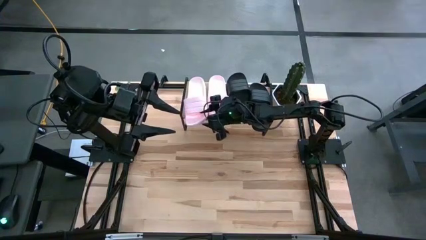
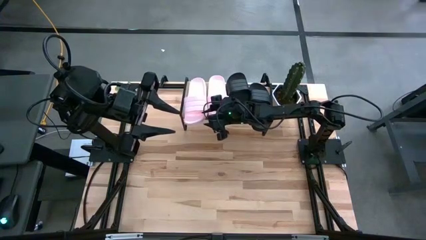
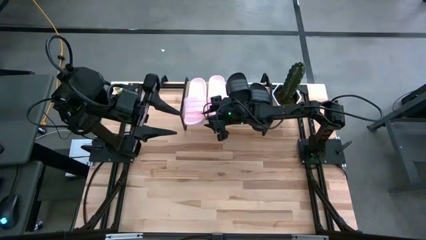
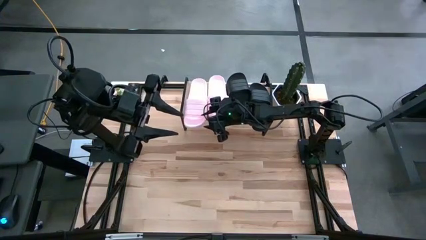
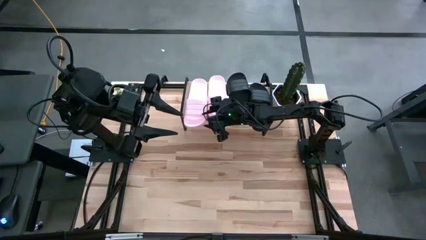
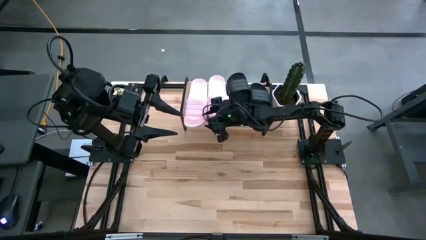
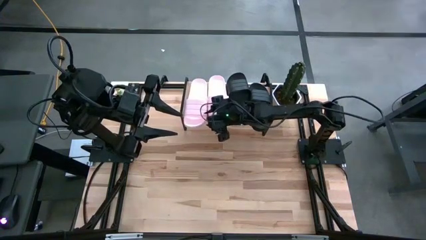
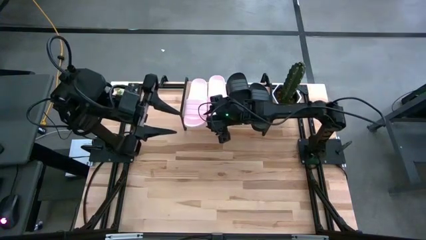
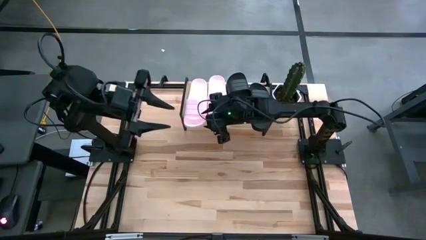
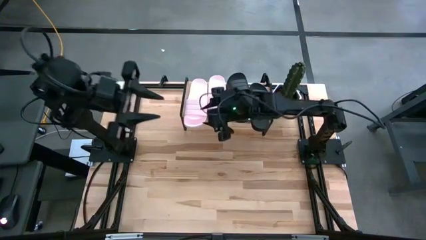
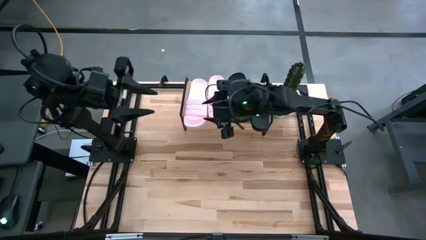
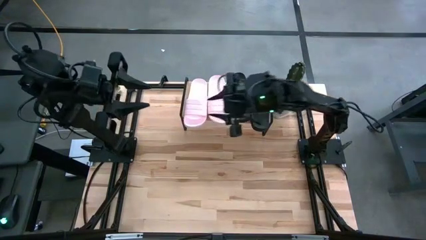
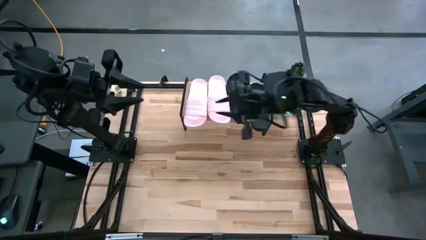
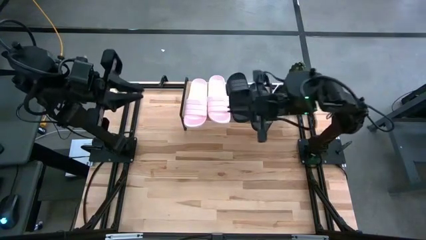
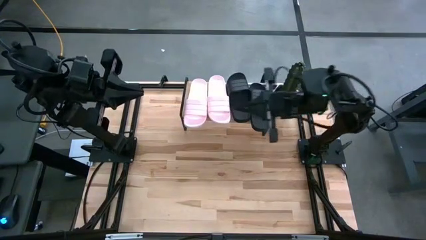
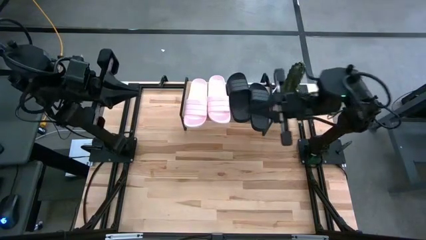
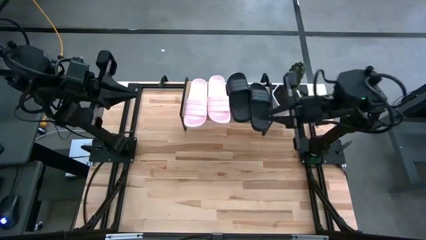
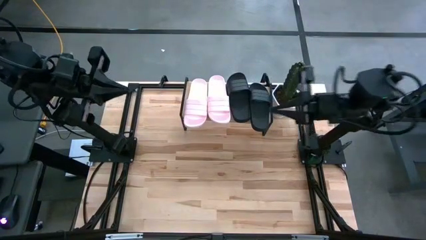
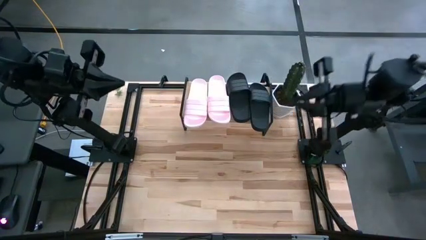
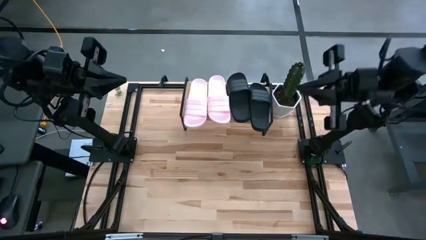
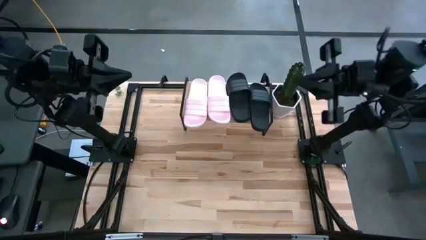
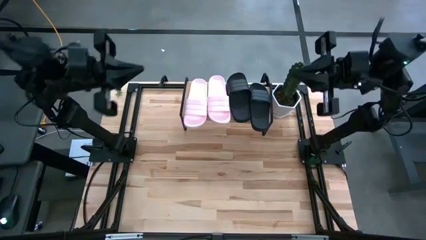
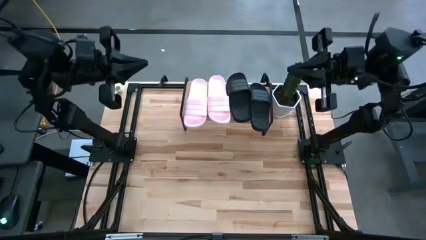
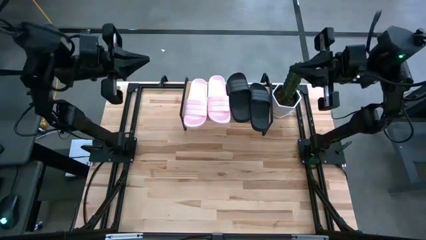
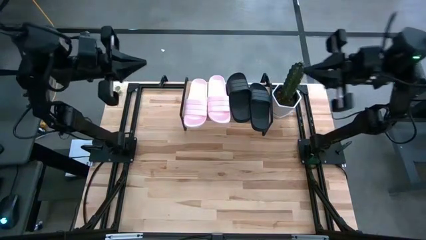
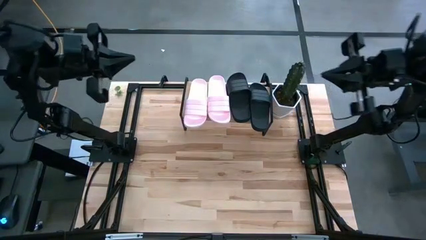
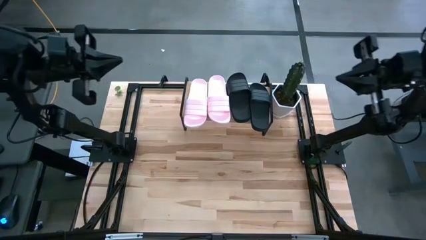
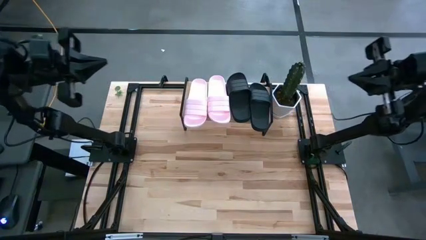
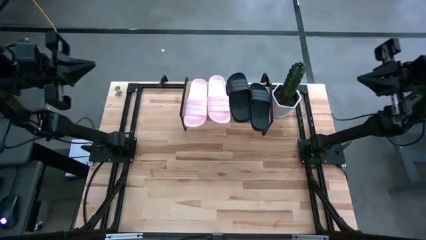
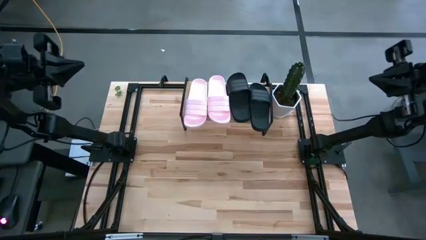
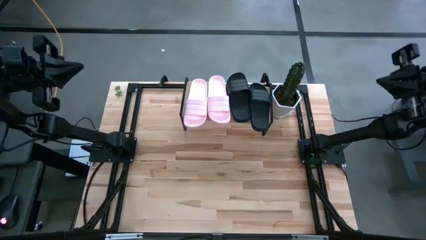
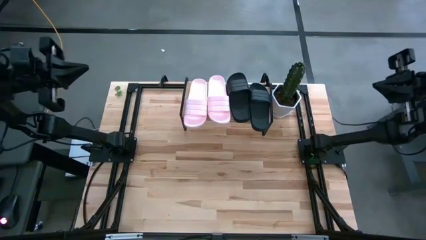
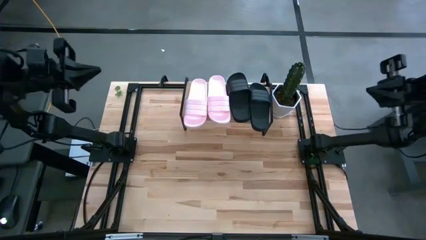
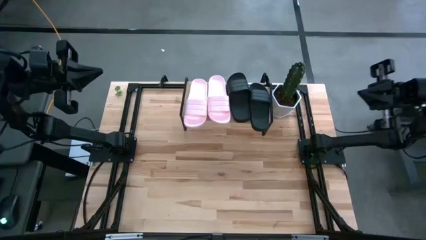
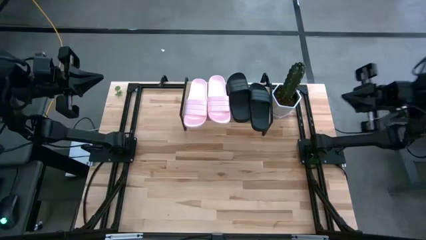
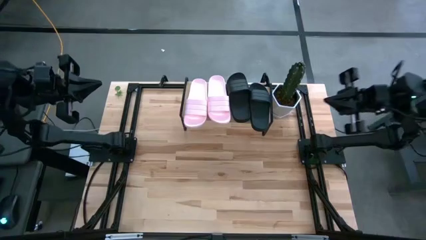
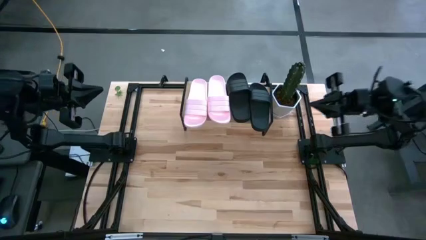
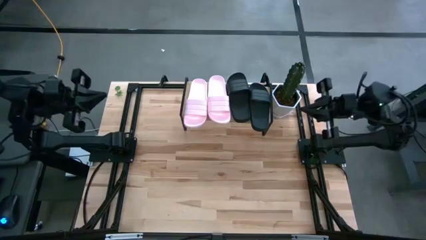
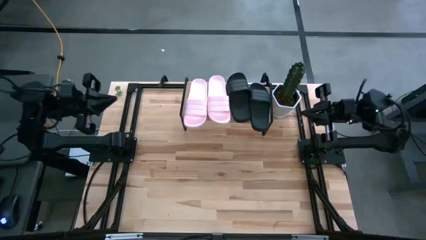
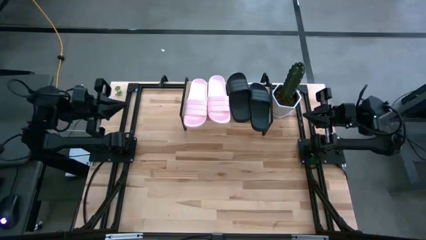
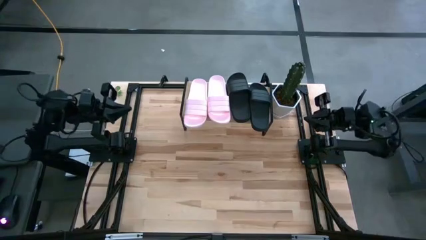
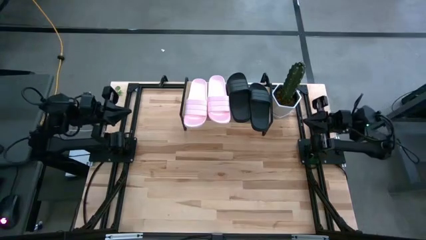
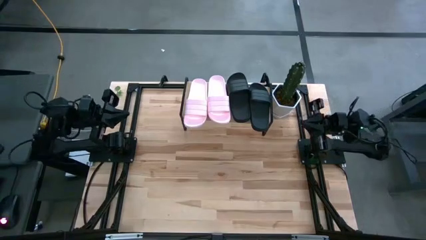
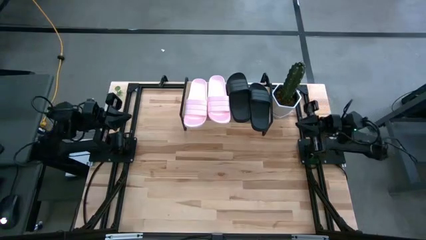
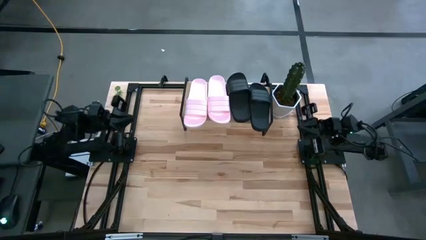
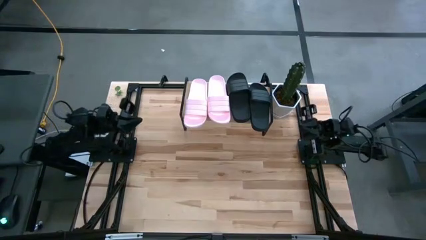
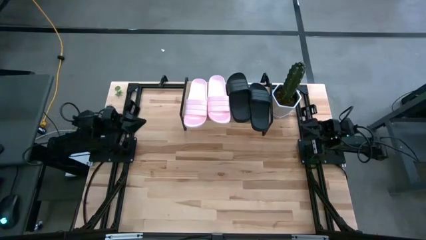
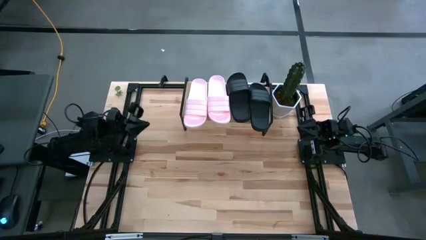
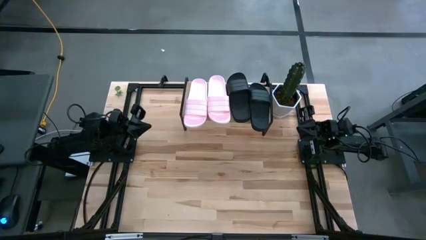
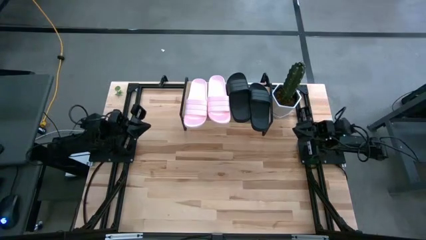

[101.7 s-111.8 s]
Task: Pick and place slides into the shelf
Return to Home Position

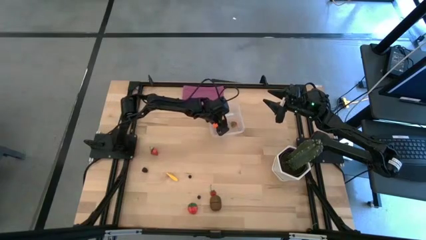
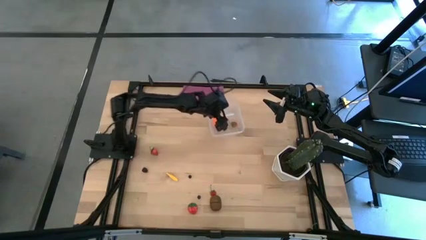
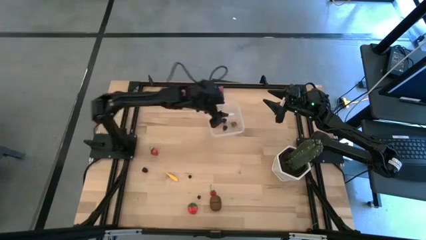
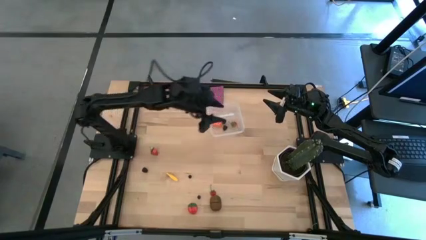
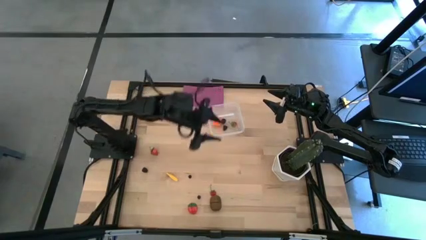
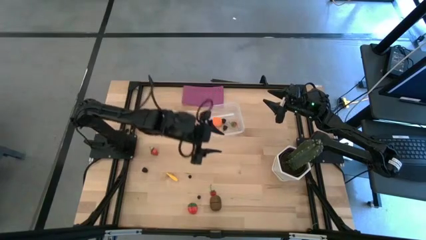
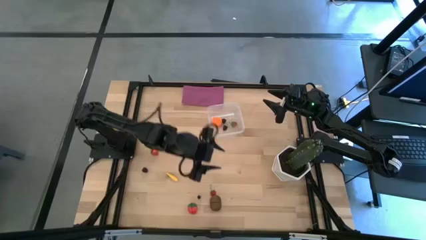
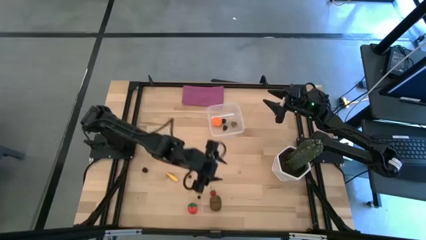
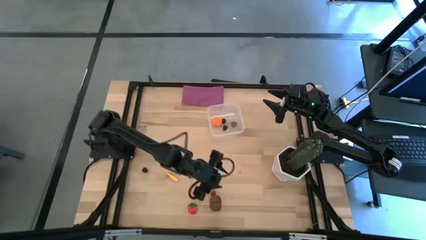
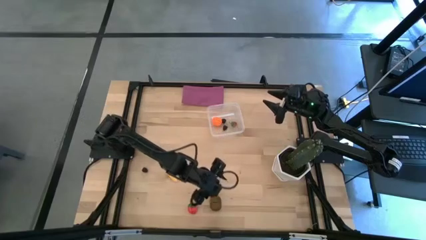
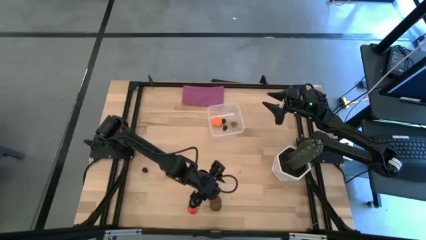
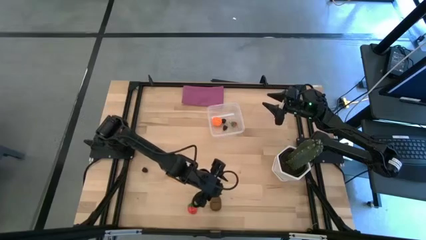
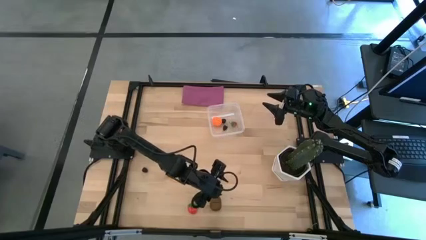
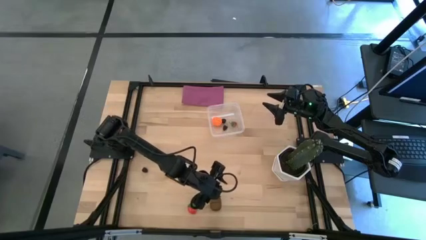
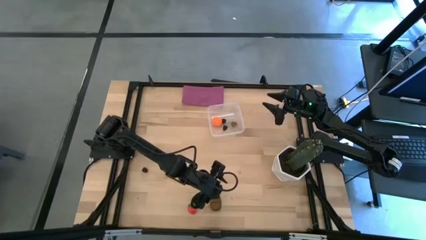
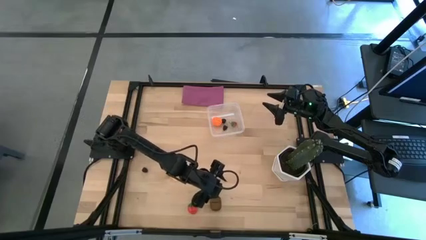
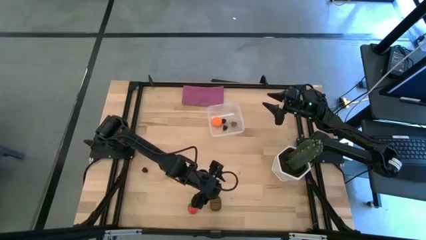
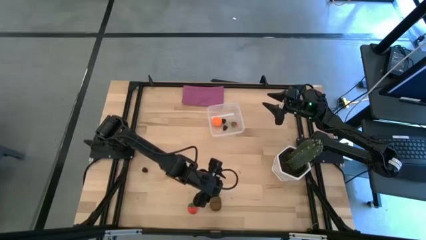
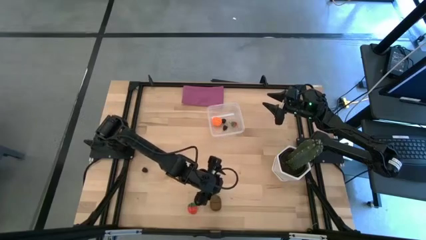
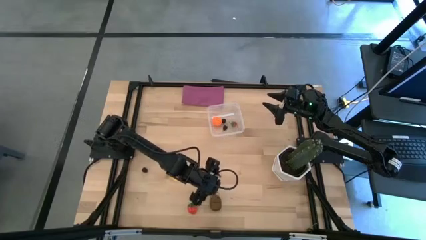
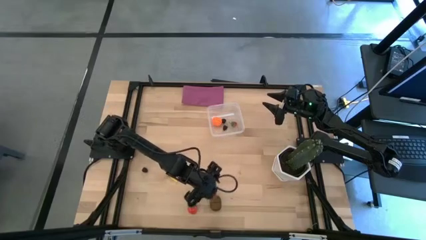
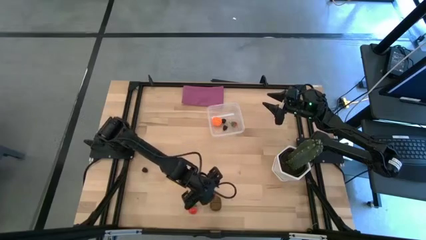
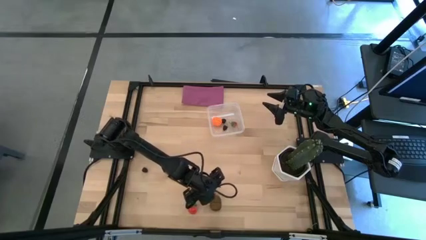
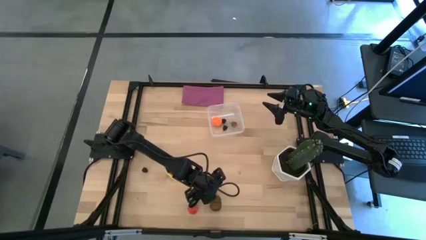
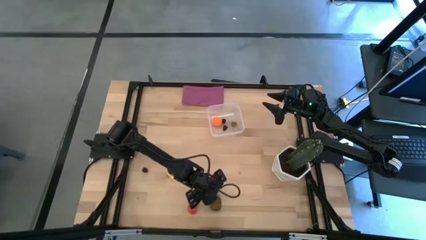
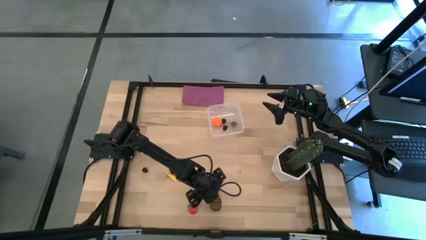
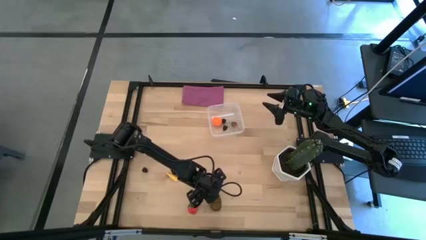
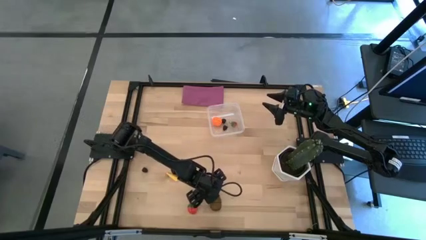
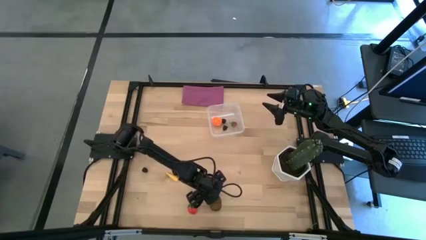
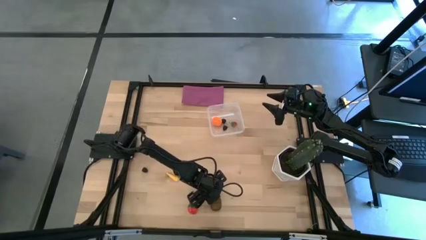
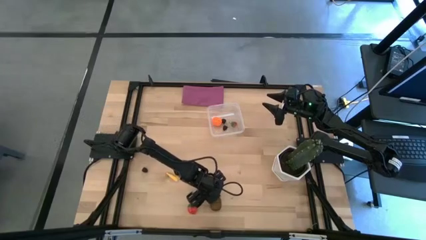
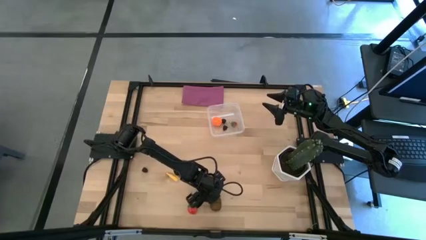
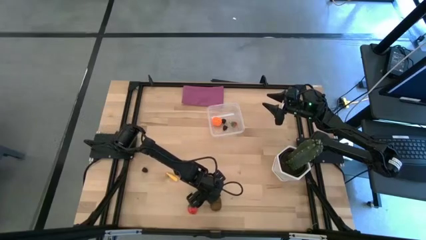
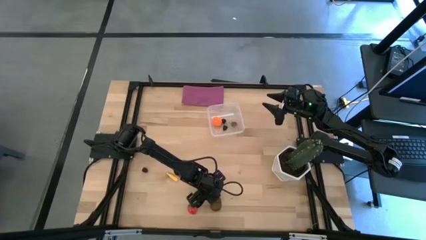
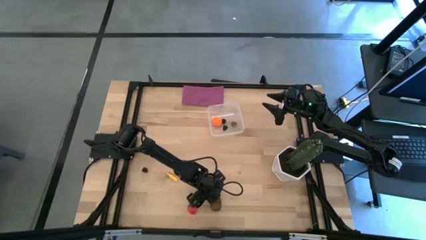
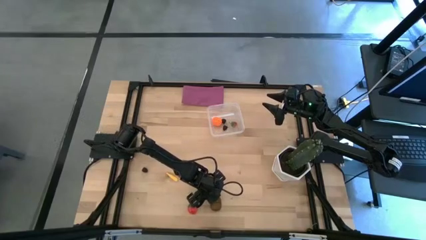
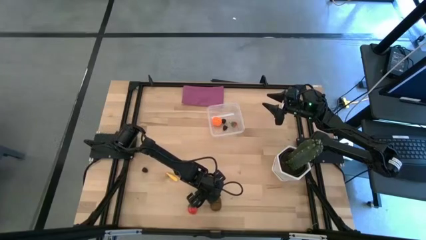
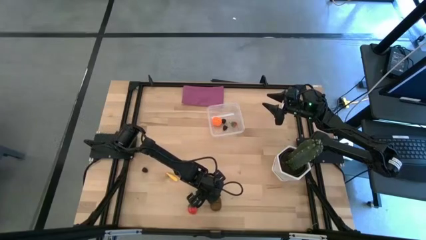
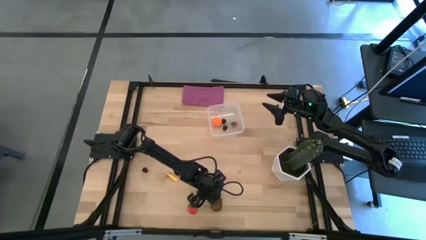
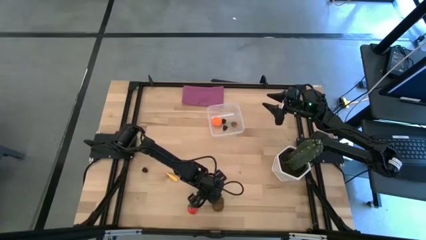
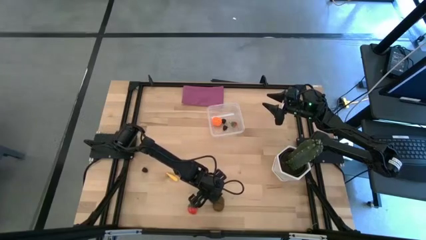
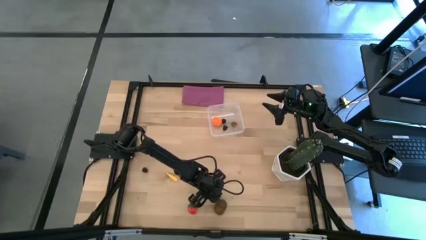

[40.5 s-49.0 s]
Task: Pick and placing Produce into tupperware
Put the middle red strawberry into the transparent bin

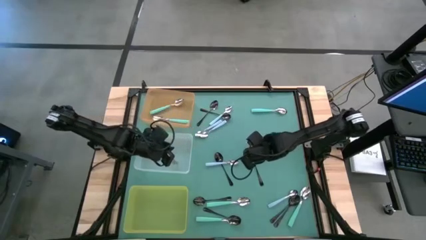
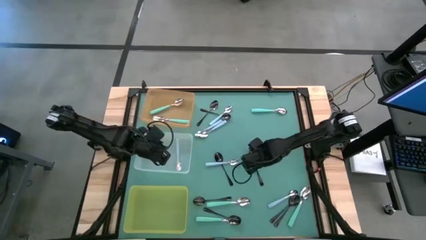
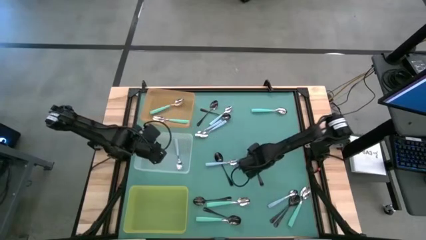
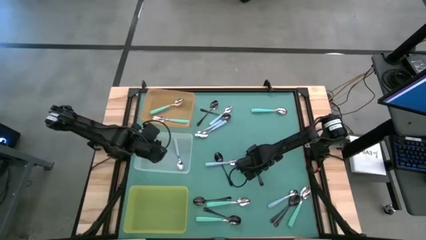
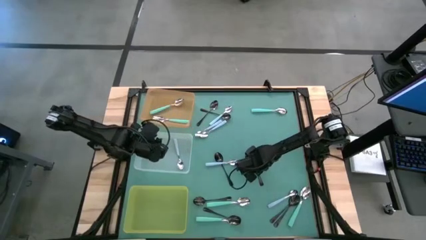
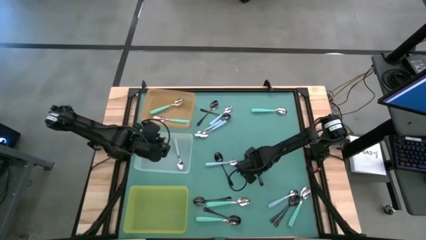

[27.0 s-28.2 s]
Task: Sort silverware by color (type)
Put the black spoon into the yellow bin
